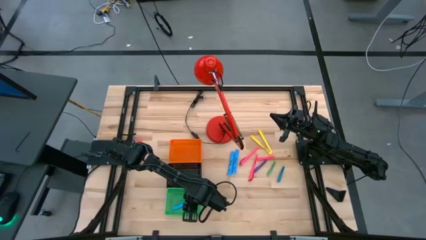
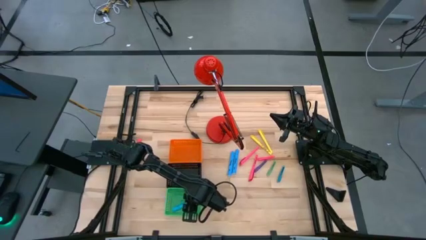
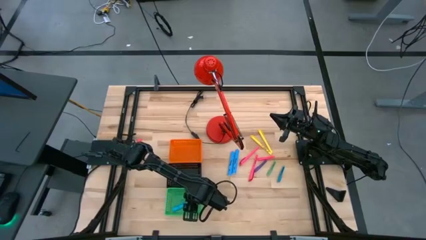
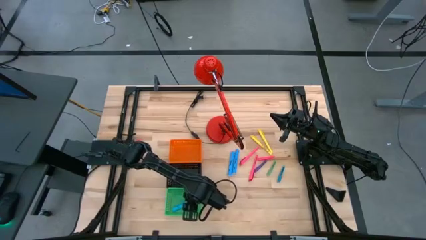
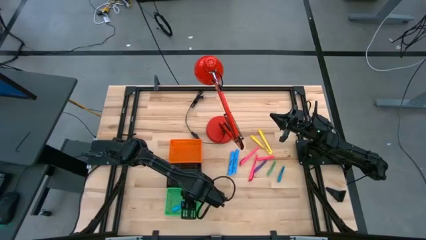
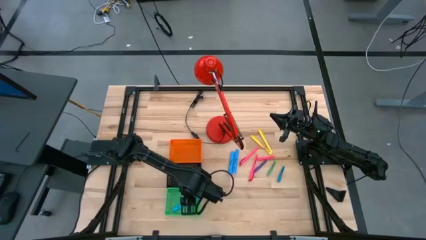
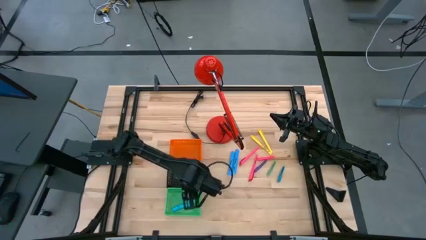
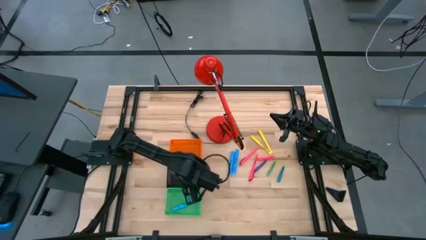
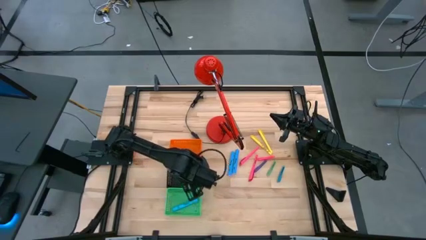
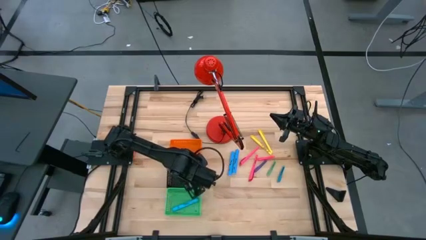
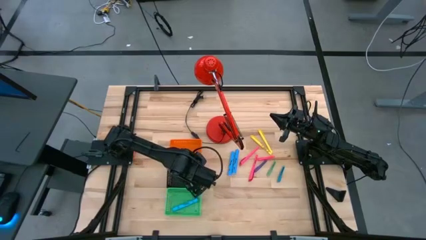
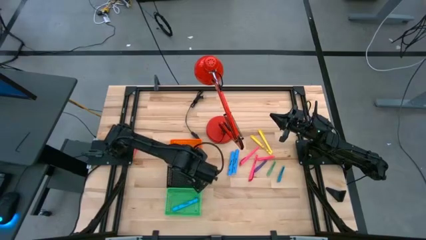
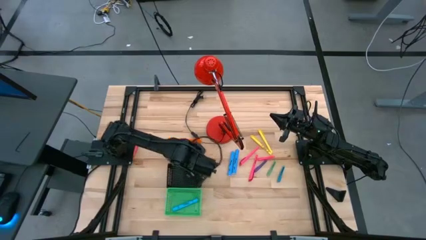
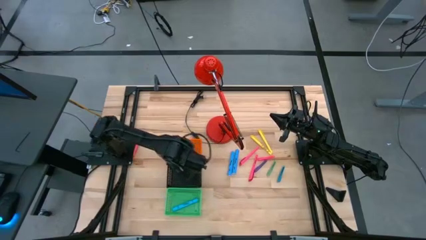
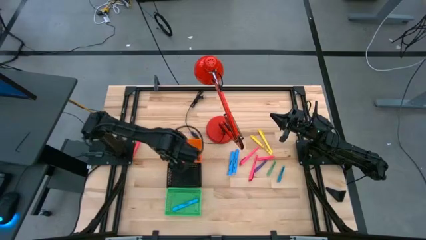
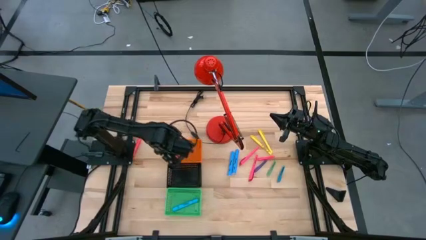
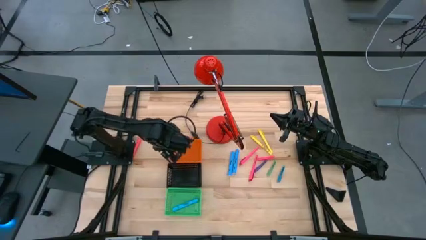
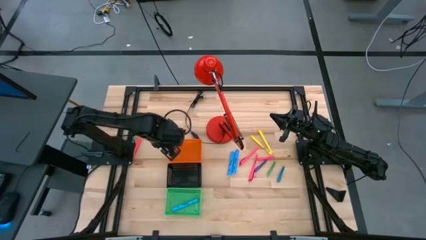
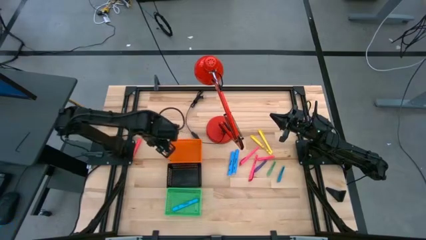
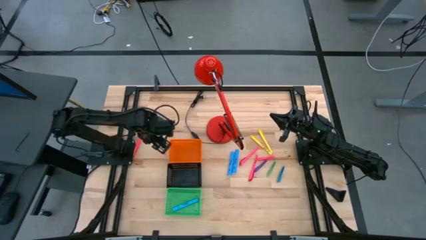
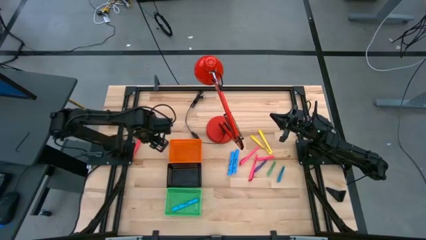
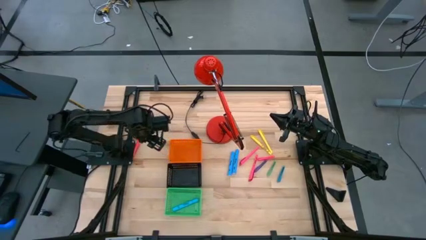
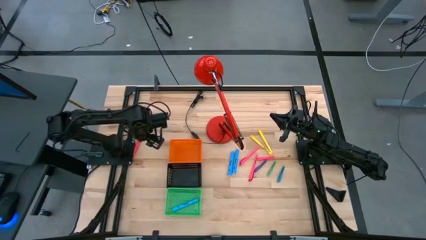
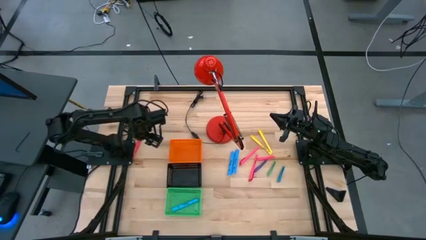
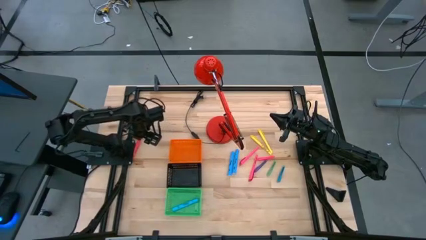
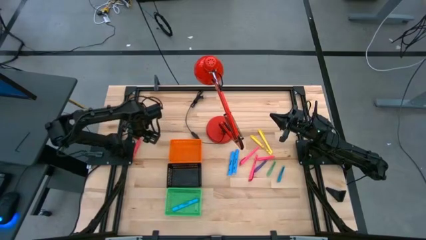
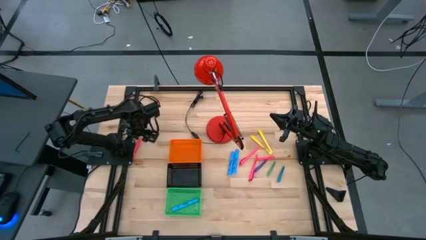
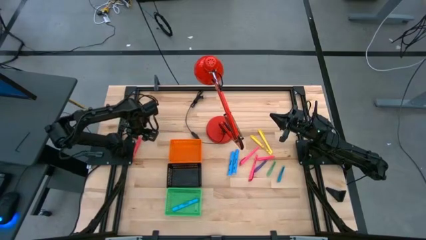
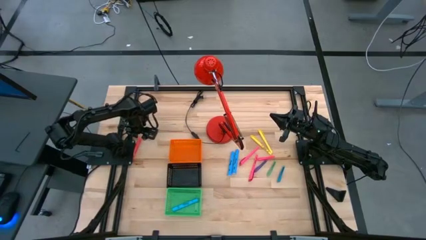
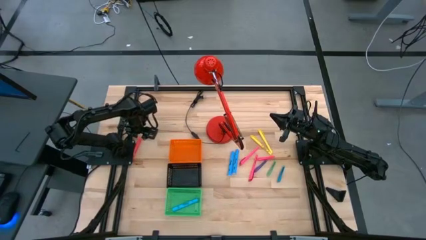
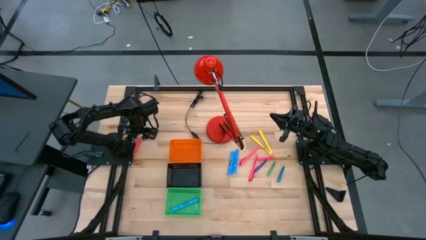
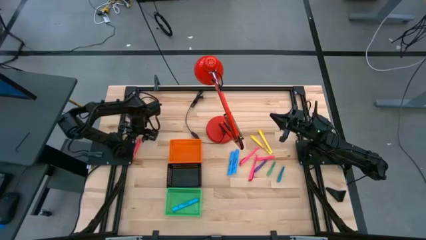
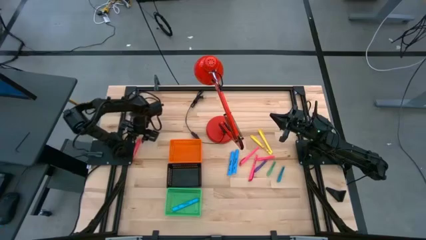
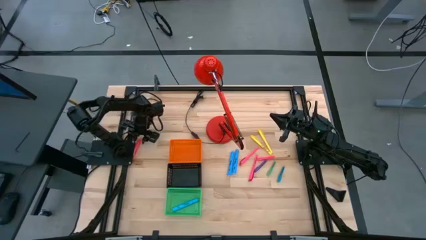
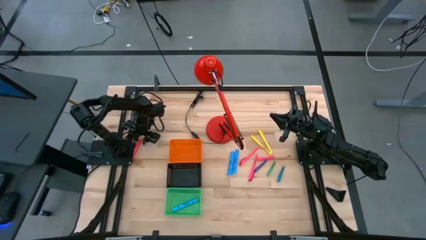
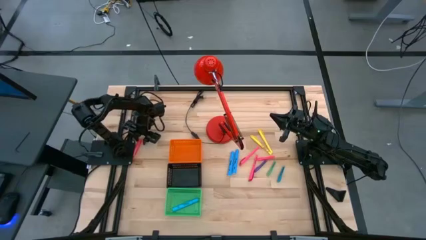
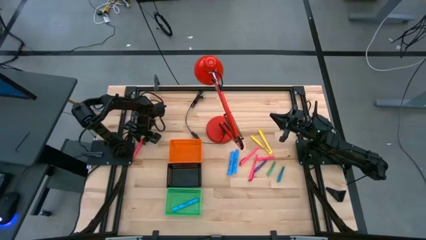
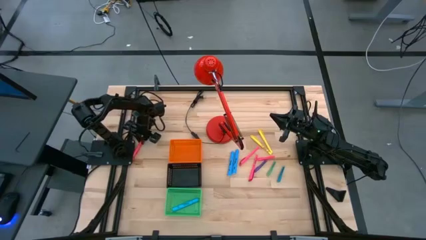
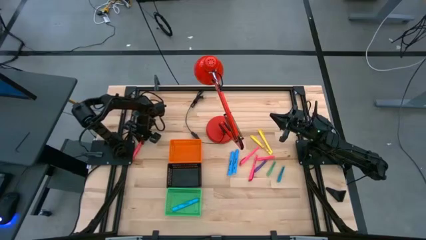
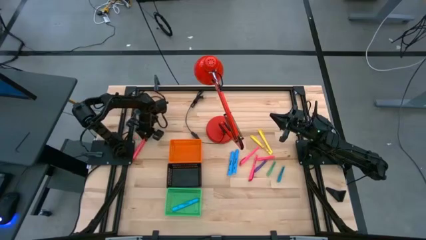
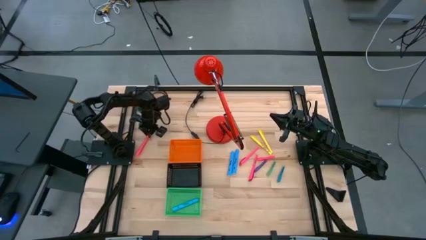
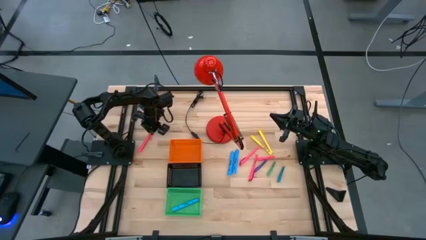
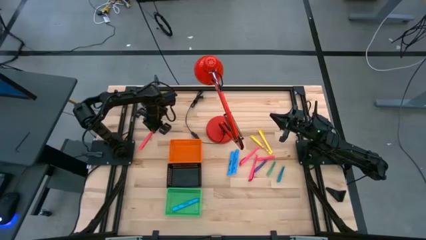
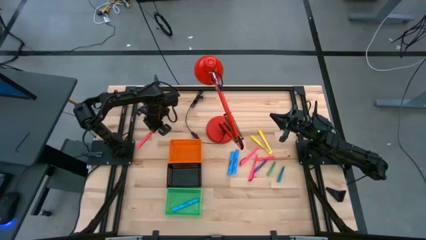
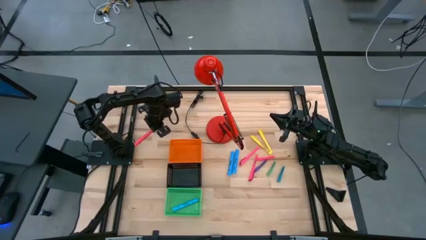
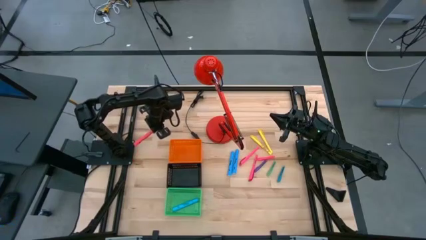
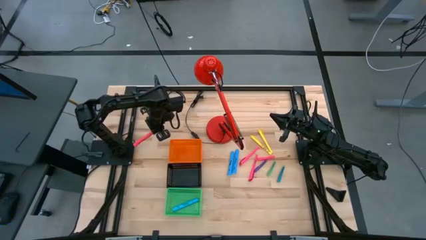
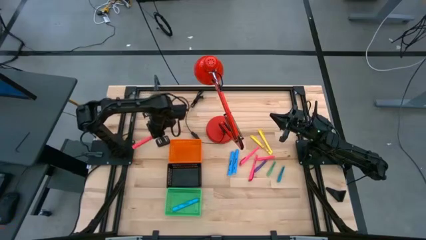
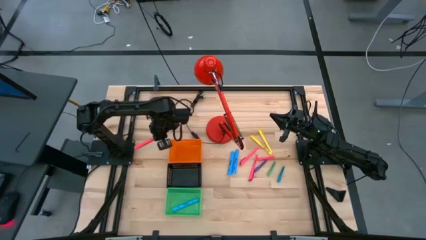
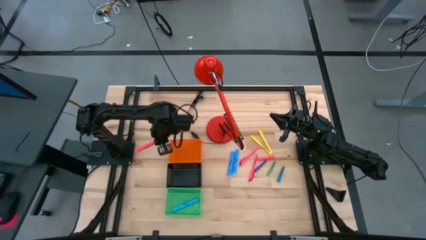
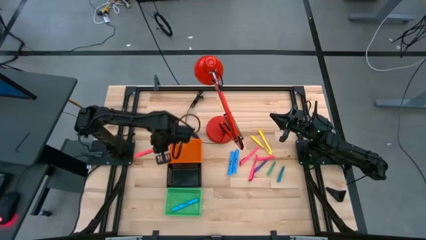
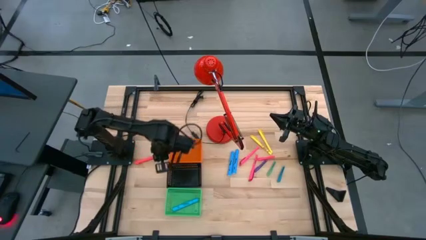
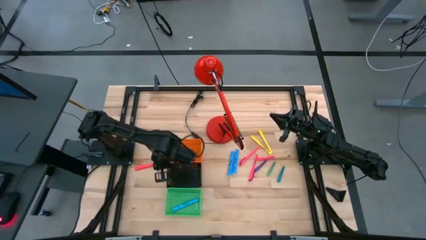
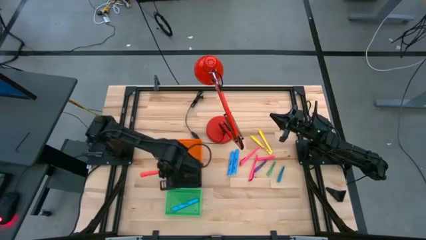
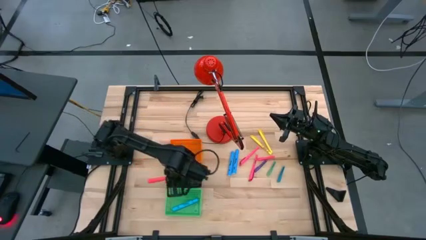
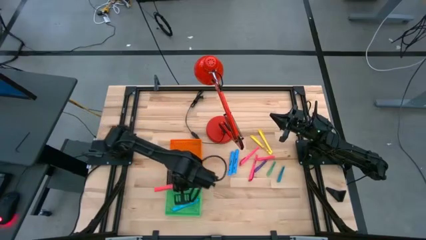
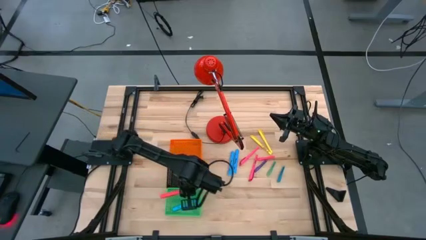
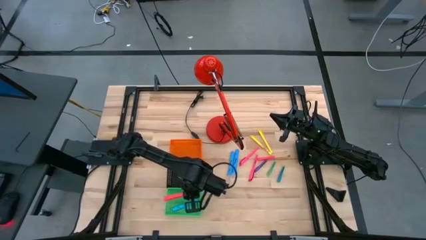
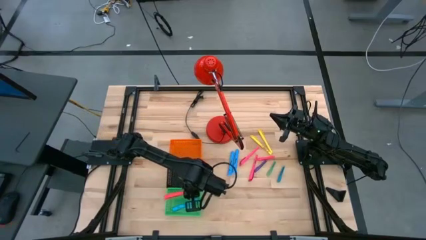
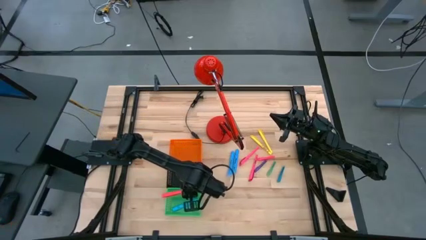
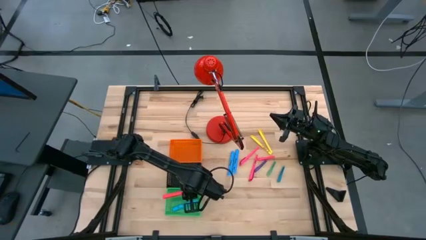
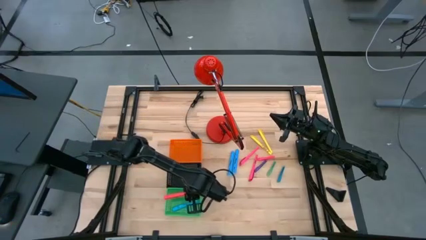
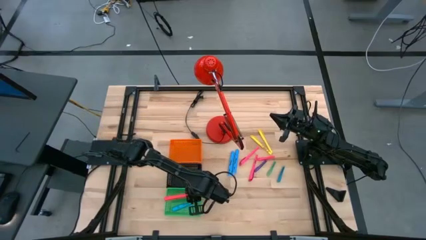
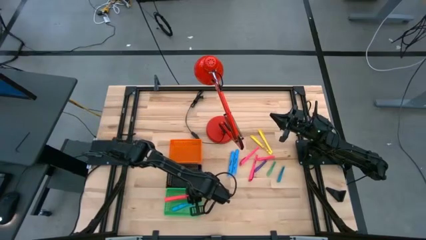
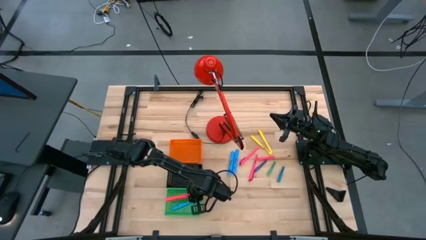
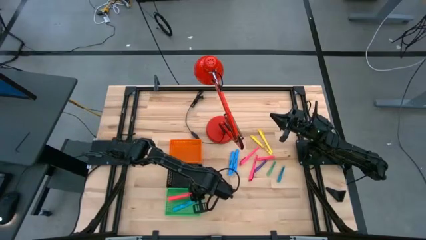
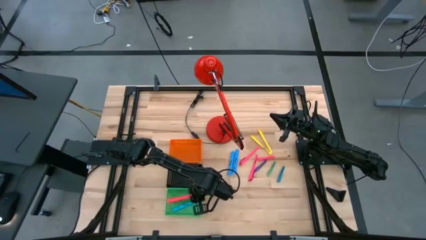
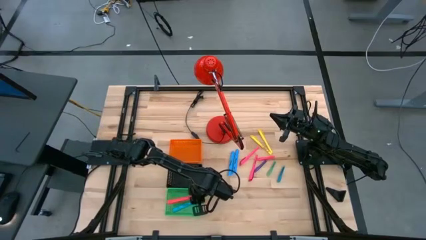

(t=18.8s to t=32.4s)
Task: Pick & Place Markers
Put the pink highlighter into the green bin
